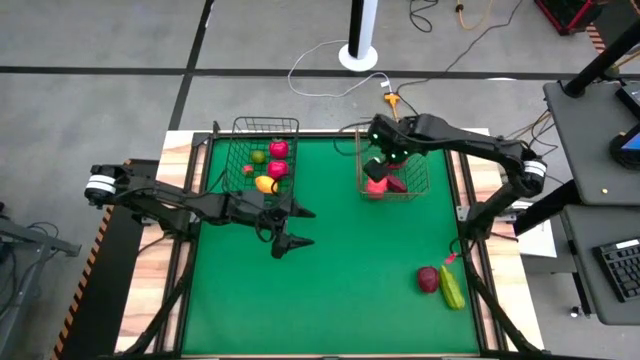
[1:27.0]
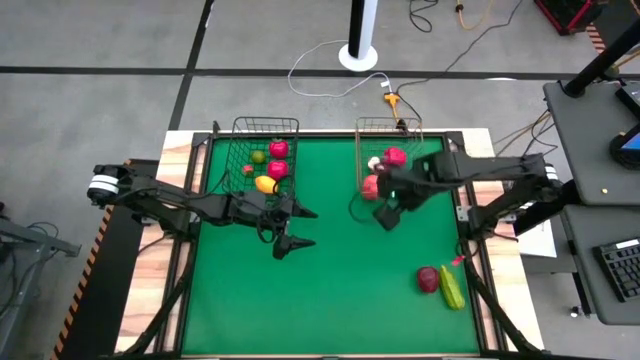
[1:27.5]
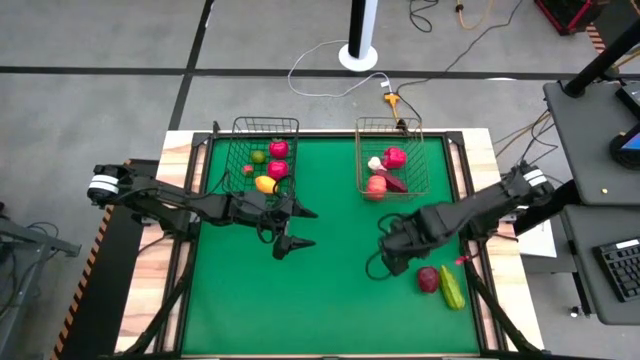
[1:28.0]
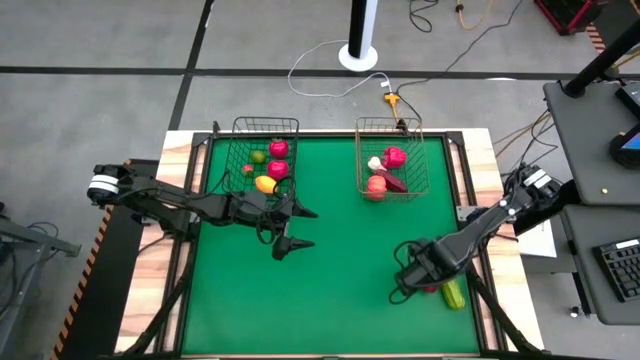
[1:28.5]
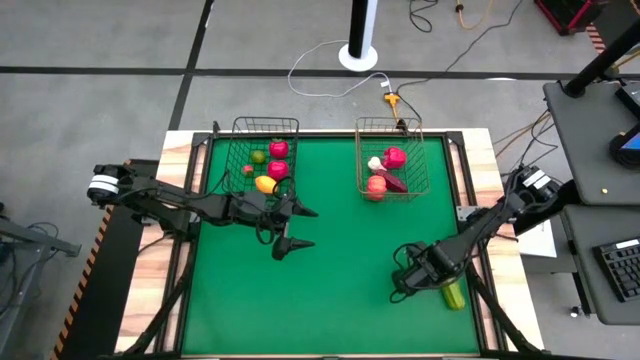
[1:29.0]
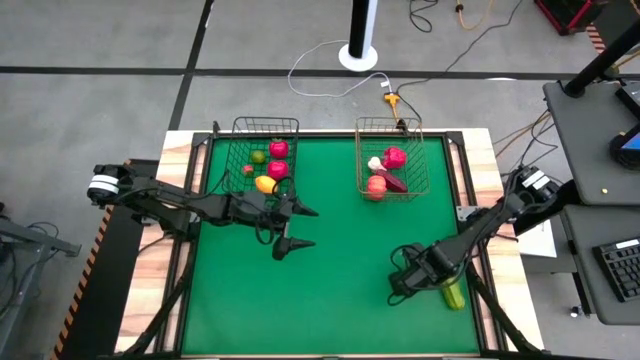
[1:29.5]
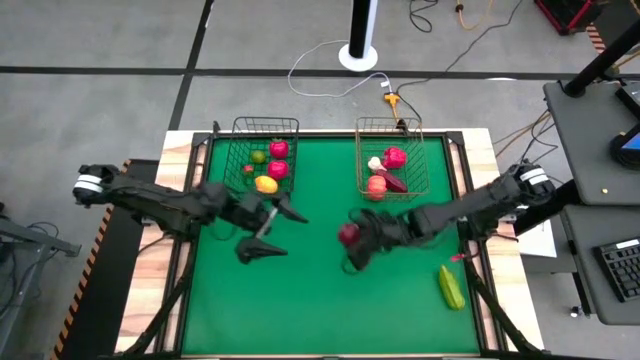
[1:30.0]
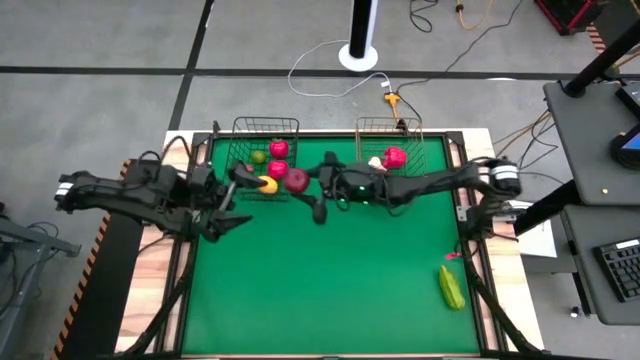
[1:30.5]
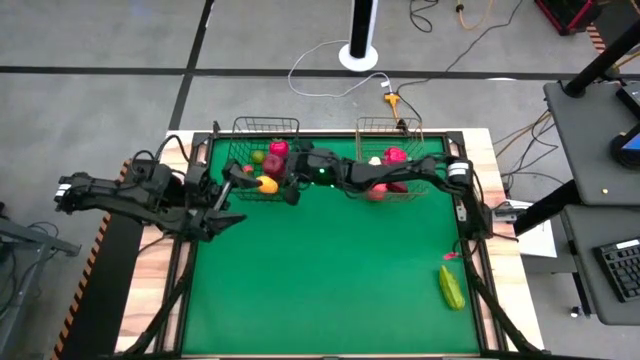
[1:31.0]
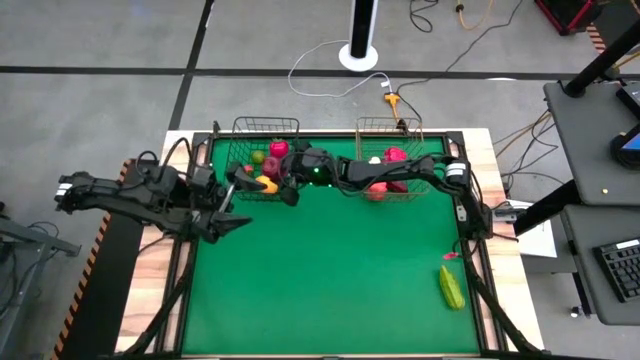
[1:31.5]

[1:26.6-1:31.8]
Task: Sort produce into baskets
Put the apple into the black wire basket

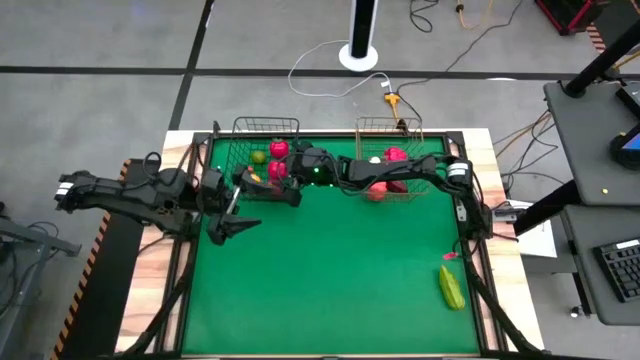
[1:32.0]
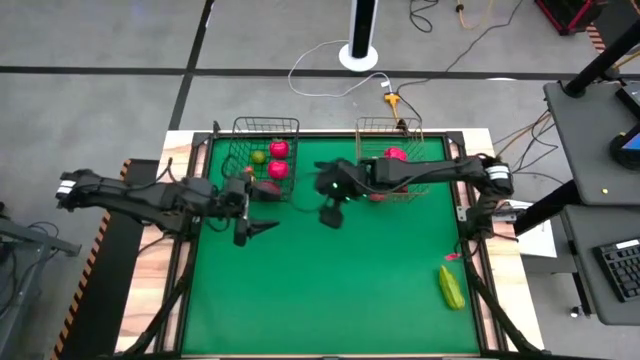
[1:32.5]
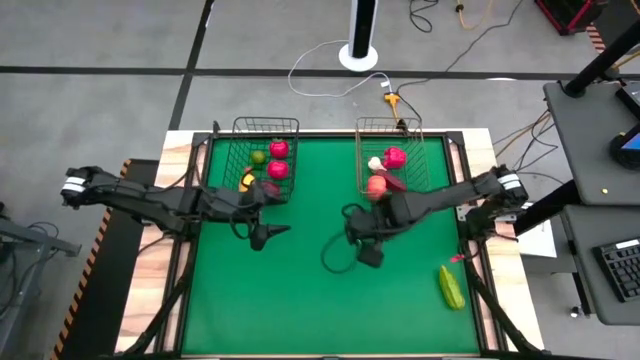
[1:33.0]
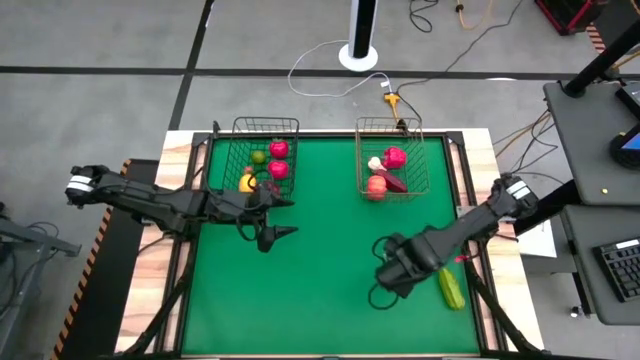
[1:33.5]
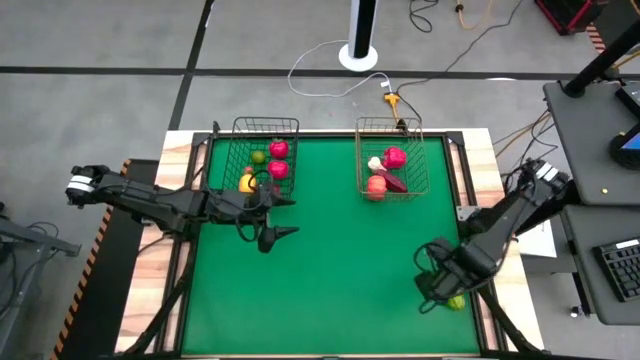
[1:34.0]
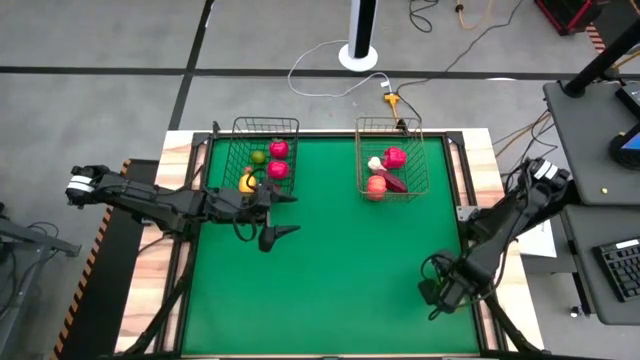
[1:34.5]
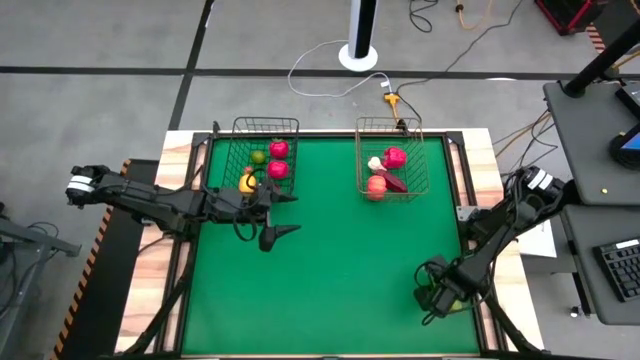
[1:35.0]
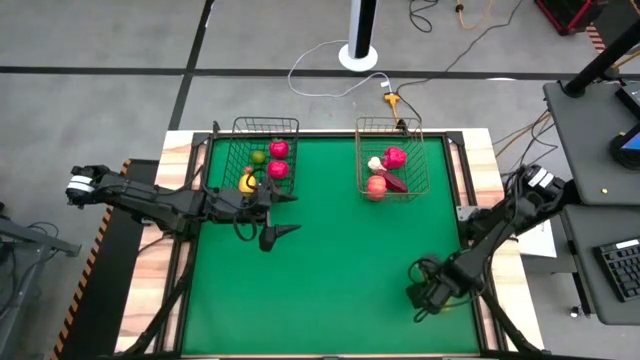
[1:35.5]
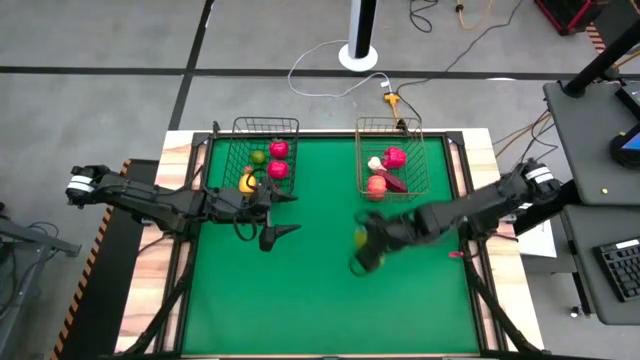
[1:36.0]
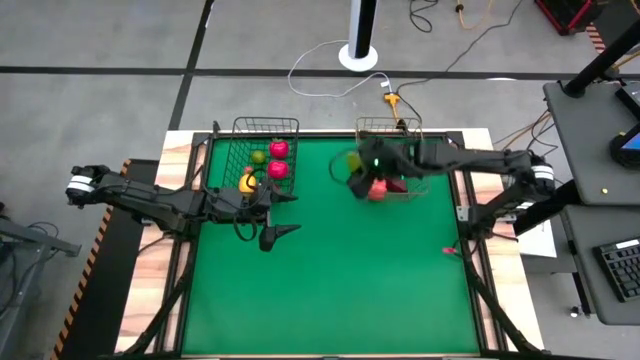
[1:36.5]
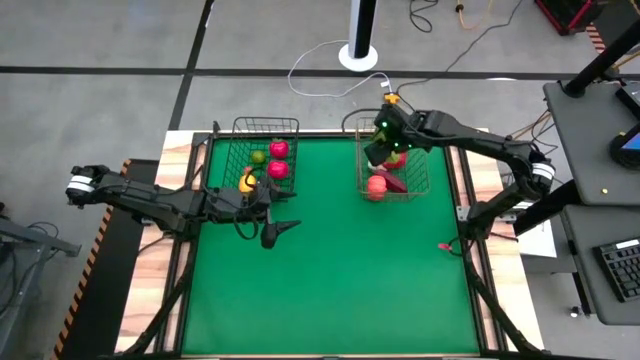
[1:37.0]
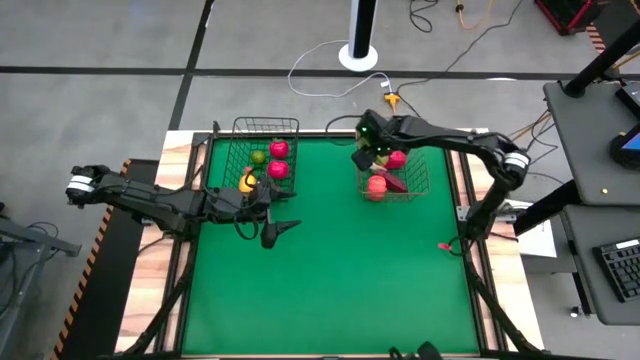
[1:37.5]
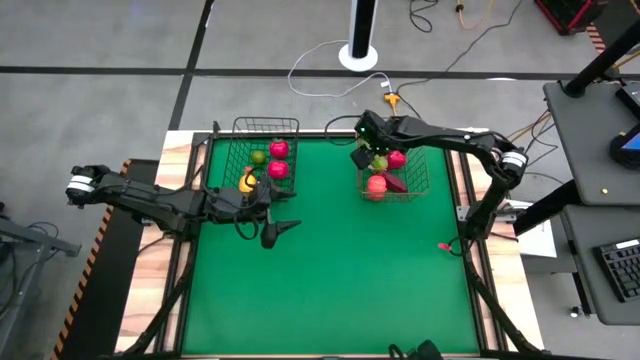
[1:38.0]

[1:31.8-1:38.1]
Put the cucumber into the gold wire basket

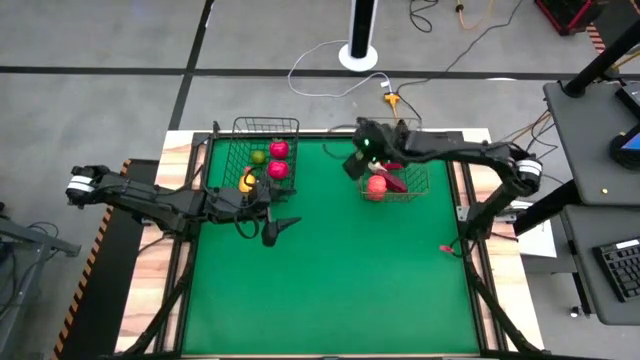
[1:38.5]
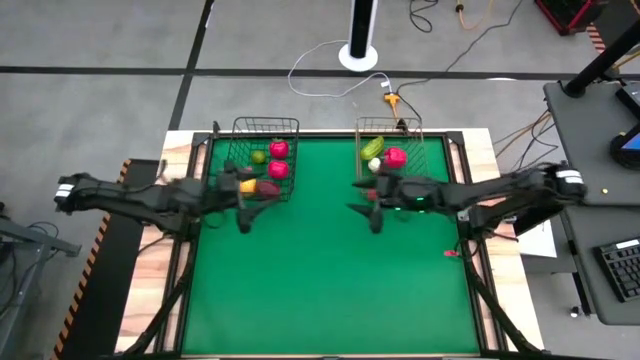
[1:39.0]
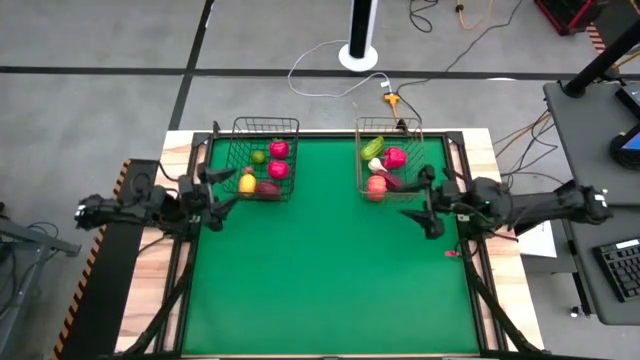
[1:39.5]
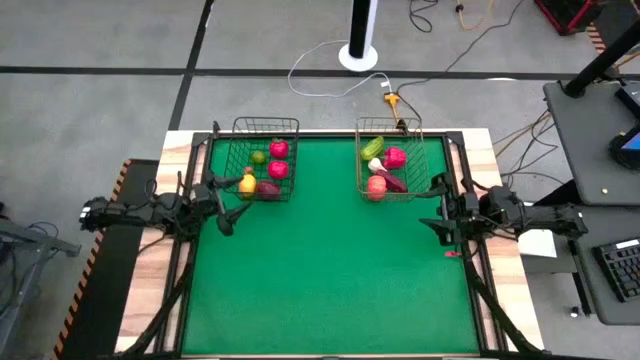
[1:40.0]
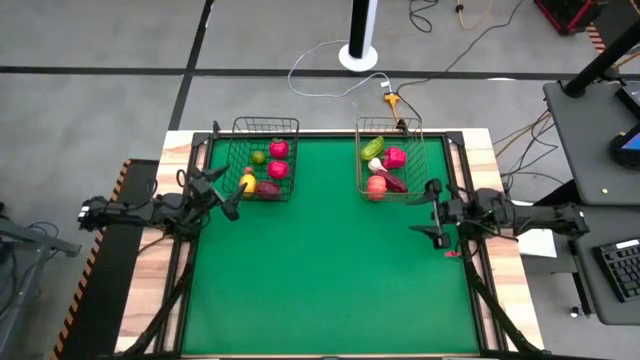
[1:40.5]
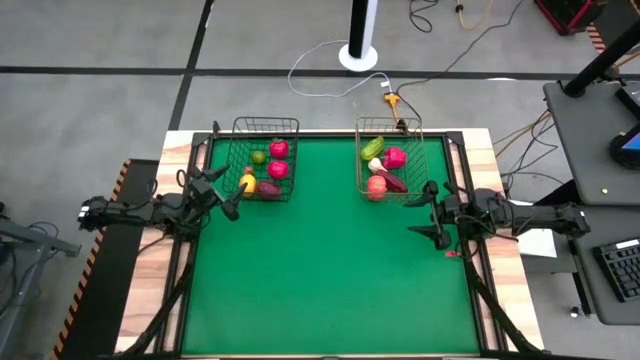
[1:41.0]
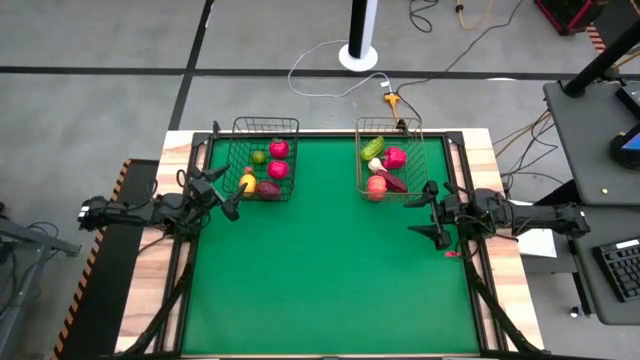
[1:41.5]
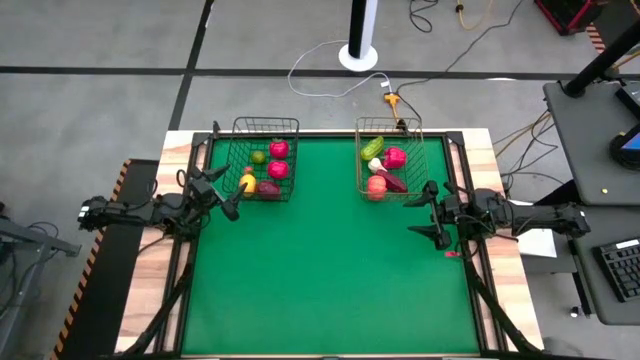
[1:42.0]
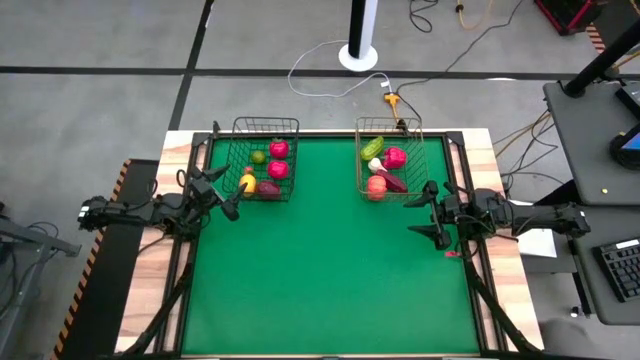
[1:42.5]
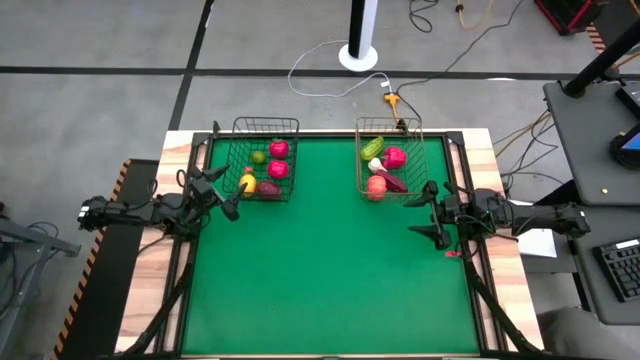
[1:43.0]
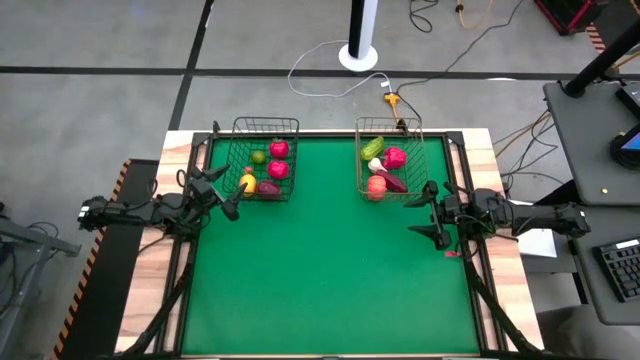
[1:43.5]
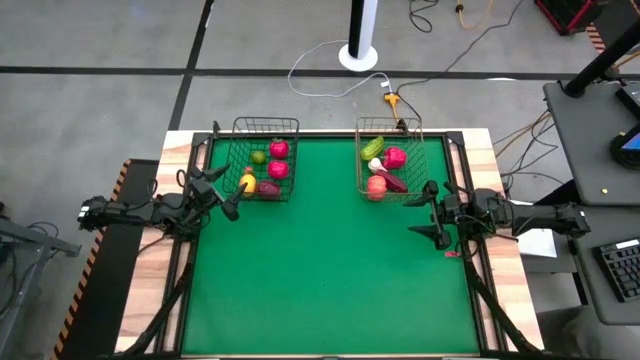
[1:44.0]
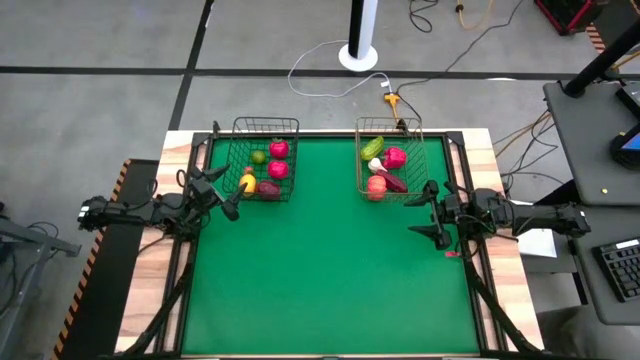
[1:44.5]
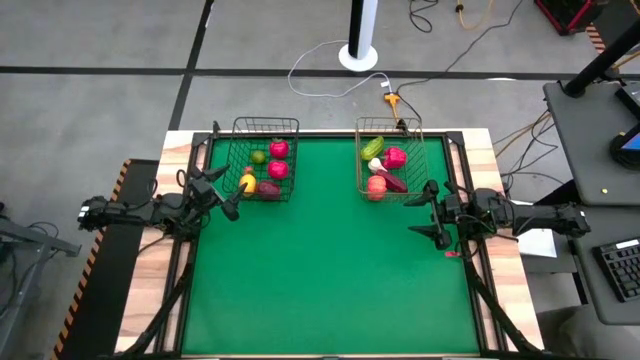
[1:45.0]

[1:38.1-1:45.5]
Return to Home Position

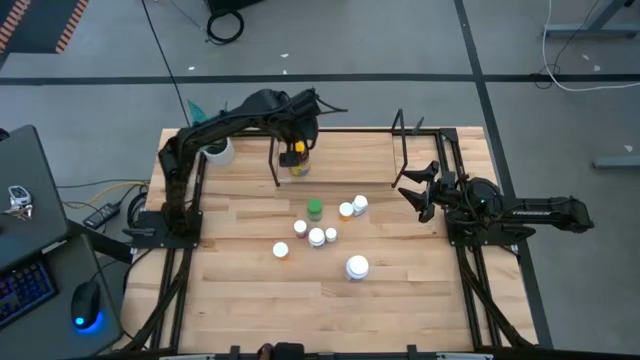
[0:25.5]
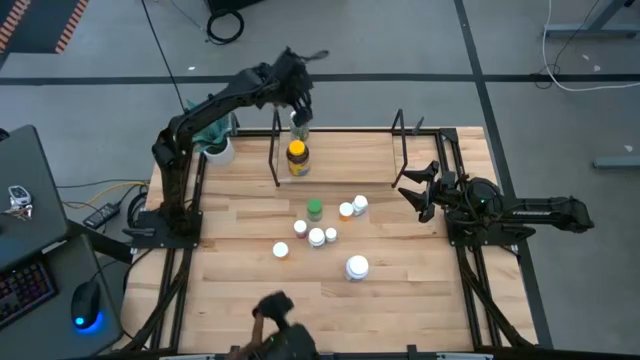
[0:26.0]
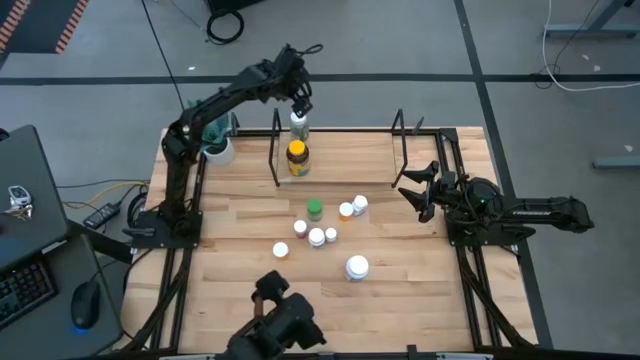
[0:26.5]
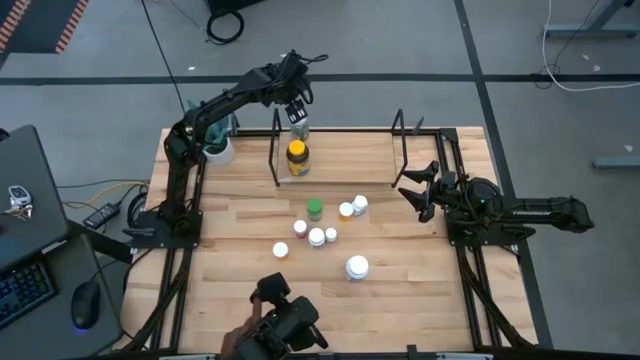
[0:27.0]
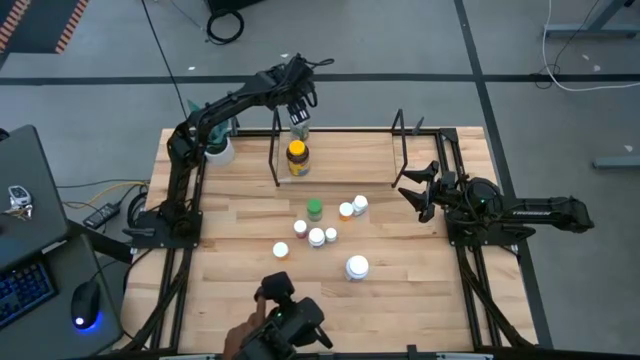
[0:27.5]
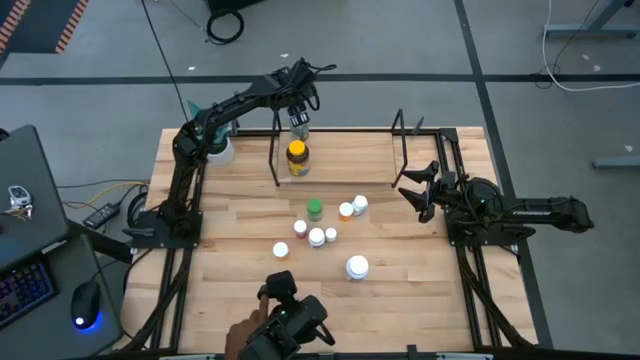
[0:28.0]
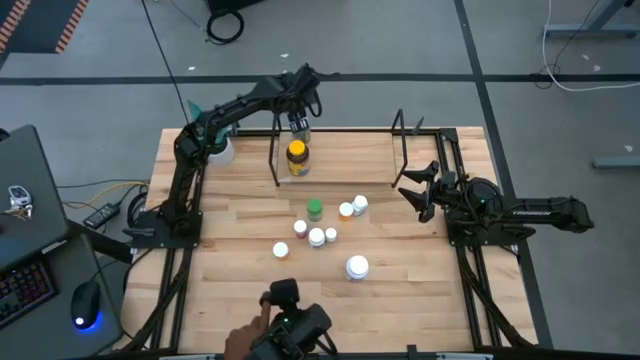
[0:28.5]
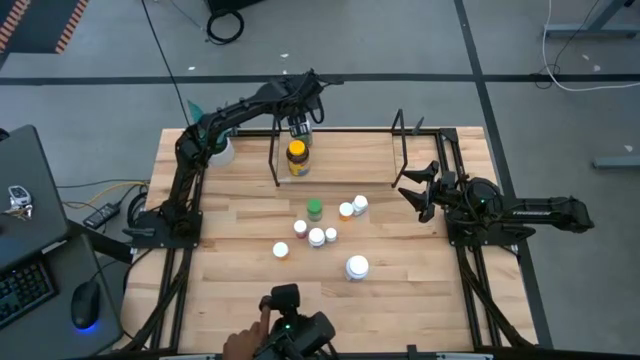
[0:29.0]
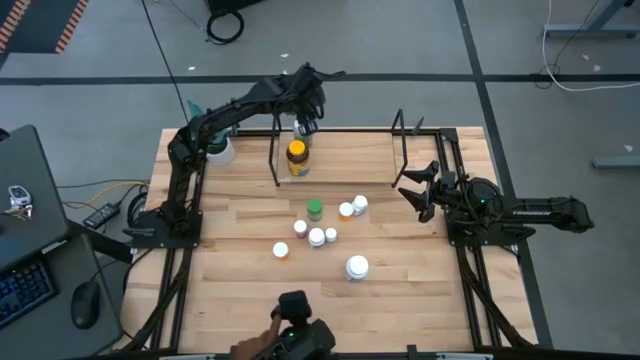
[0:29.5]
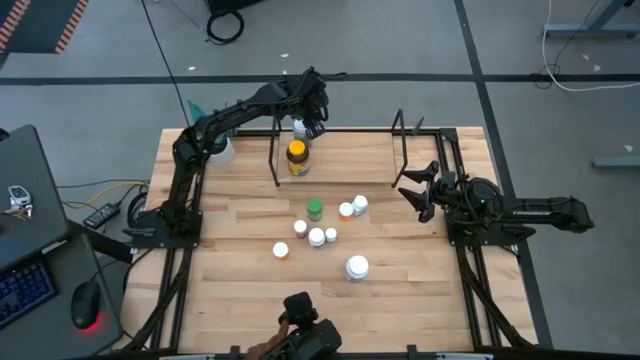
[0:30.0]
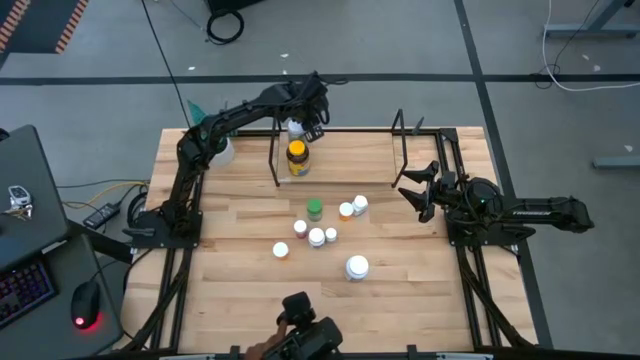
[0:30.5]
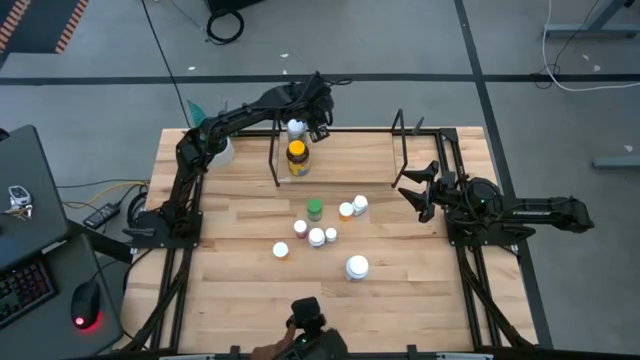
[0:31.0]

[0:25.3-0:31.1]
Task: Pick and place medicine bottles onto shelf by color
Adjust the large white and green medicine bottle on the shelf
